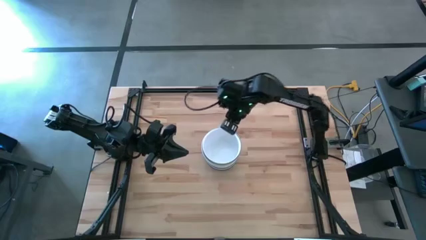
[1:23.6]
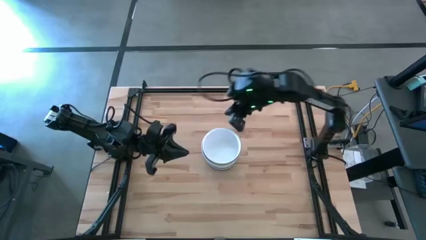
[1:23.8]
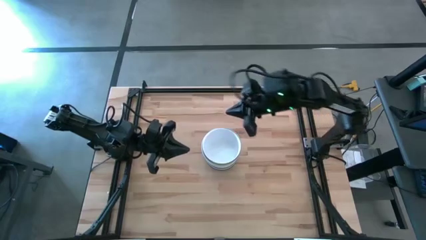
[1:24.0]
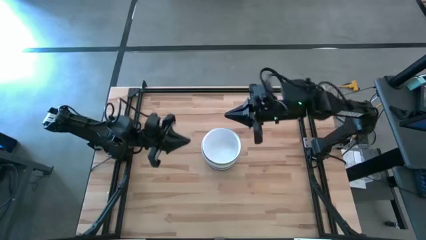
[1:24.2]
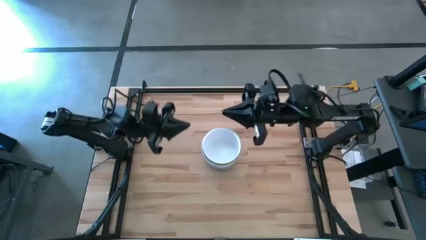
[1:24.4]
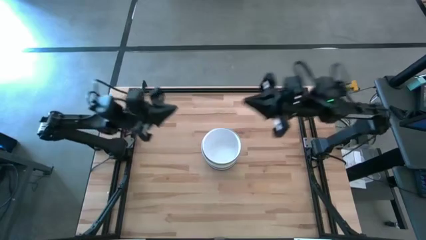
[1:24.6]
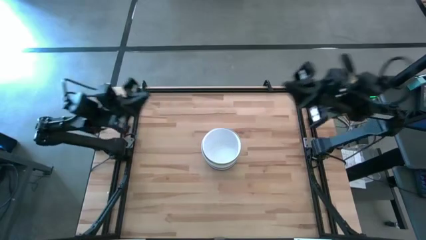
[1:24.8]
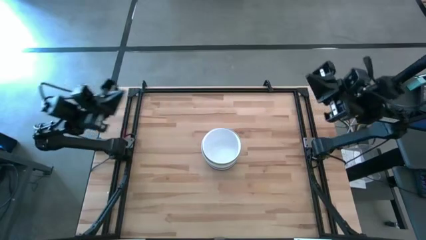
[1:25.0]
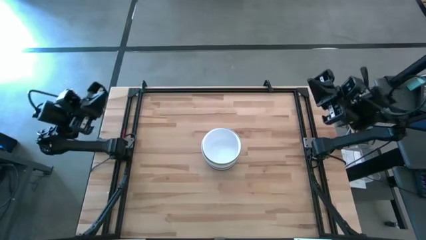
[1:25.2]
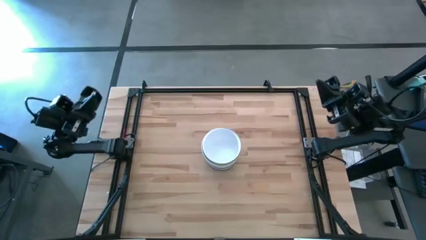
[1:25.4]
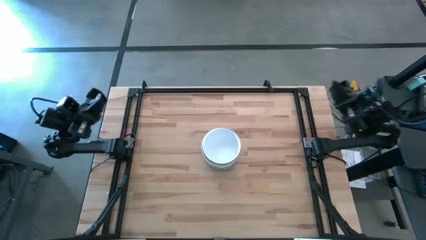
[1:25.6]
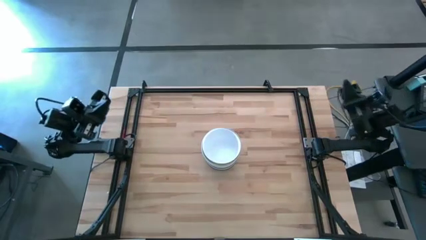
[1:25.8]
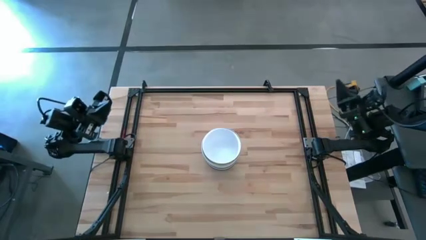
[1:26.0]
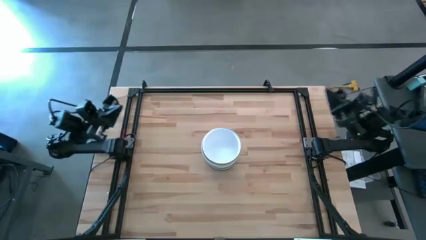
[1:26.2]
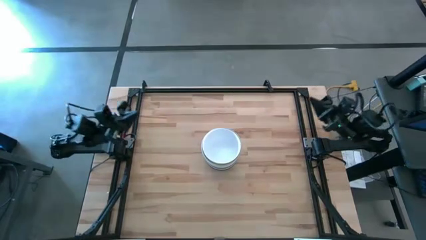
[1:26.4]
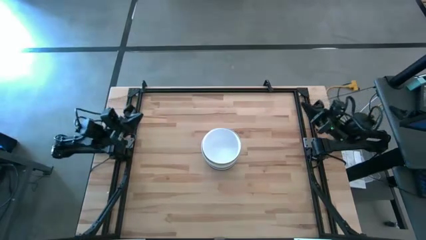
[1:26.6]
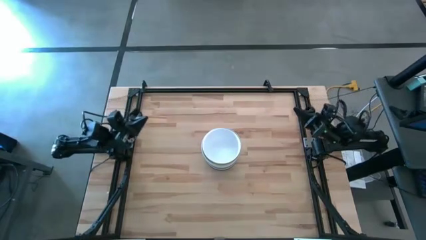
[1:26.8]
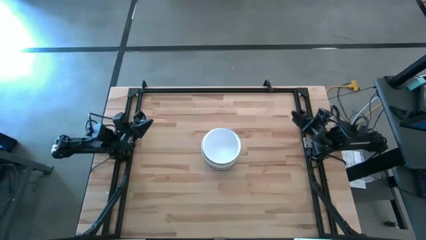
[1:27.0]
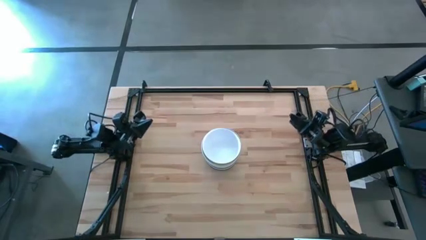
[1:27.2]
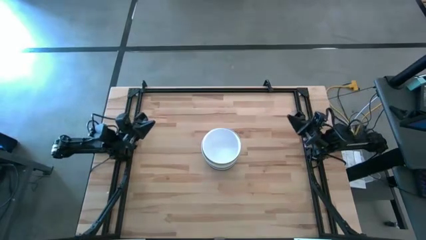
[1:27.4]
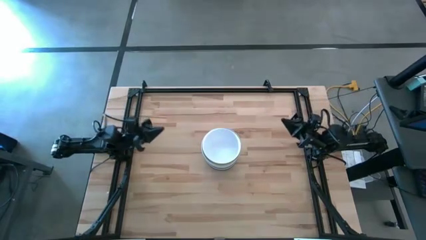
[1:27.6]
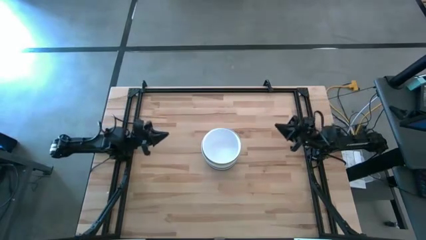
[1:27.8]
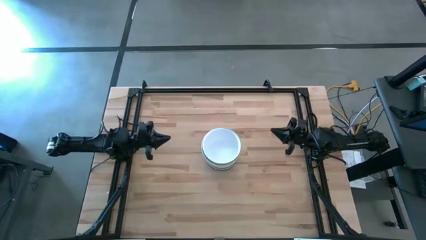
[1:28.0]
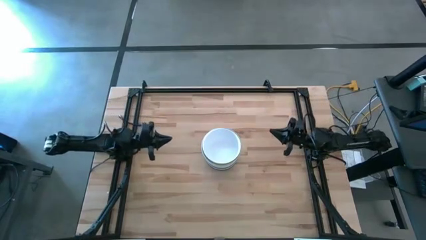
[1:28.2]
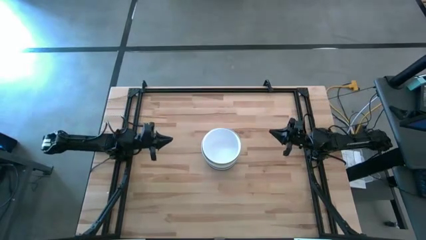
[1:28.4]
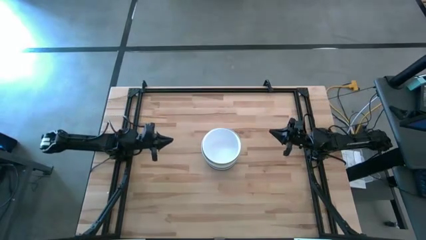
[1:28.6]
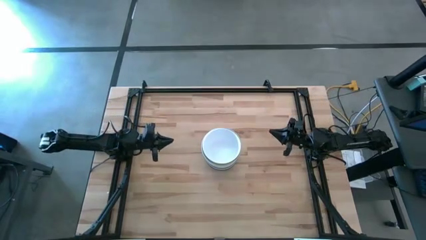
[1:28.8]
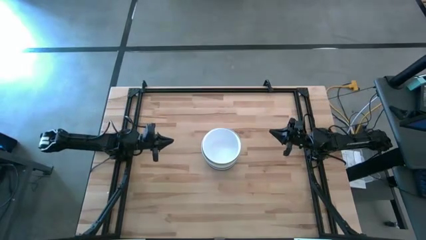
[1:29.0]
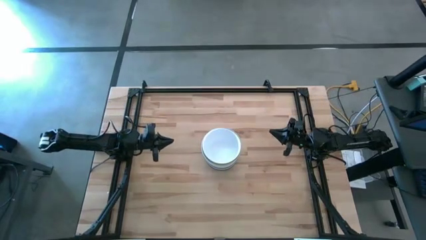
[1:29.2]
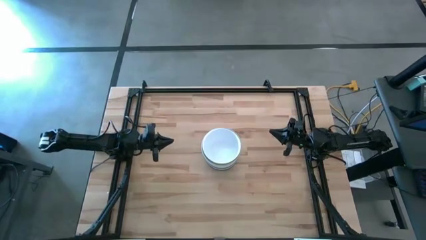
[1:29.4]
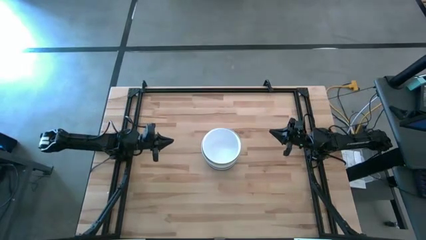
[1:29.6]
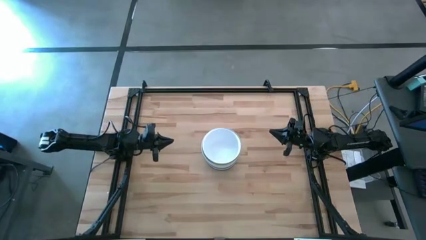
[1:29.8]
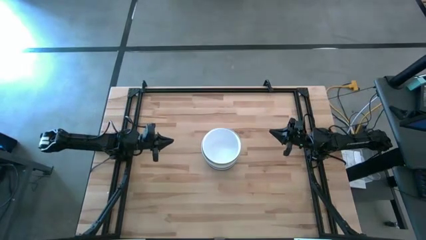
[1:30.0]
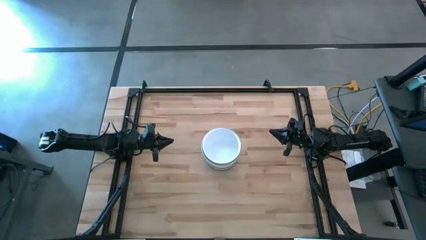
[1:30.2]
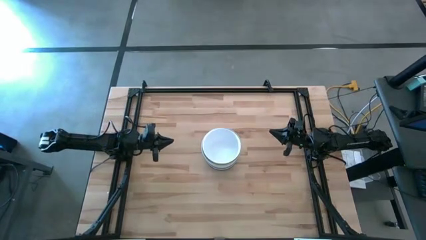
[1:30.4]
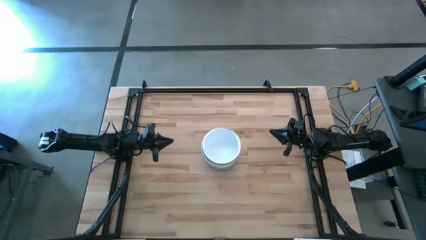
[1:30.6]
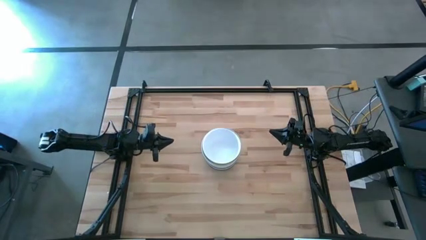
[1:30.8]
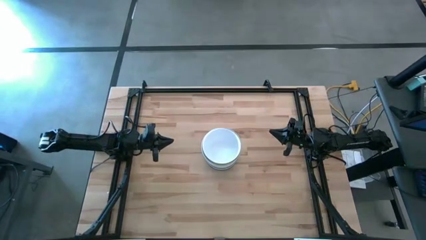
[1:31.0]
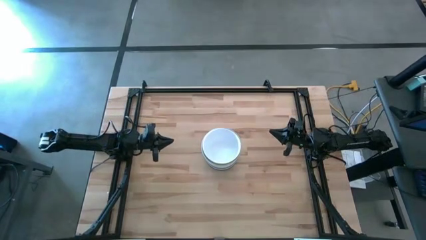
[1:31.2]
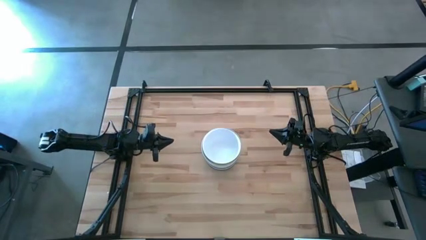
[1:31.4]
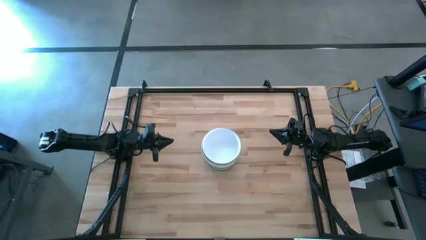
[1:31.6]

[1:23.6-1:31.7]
Task: Nest bowls inside each other
Return to Home Position

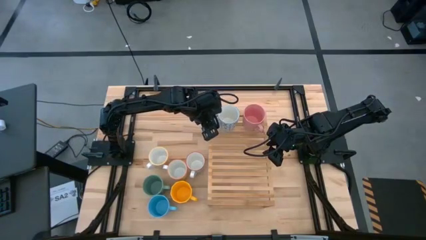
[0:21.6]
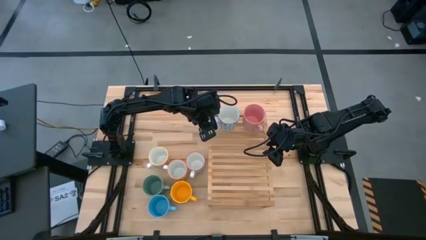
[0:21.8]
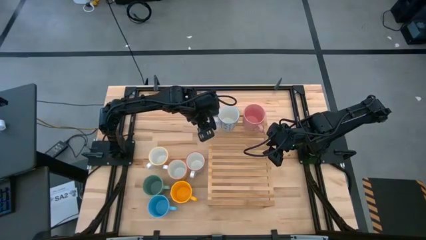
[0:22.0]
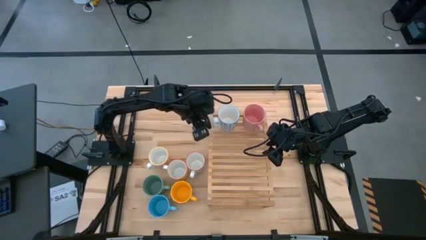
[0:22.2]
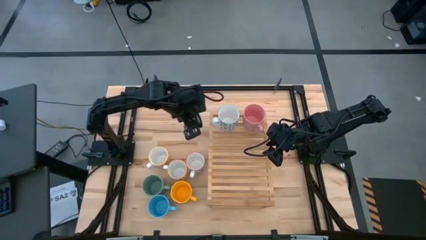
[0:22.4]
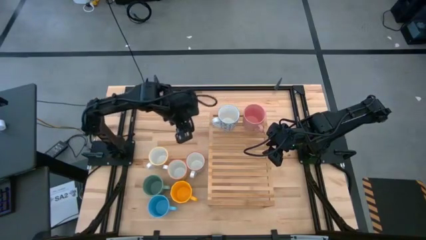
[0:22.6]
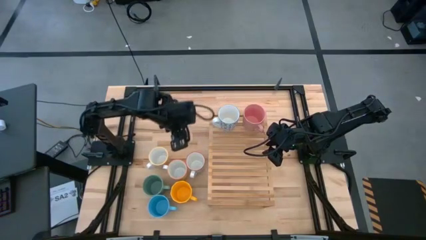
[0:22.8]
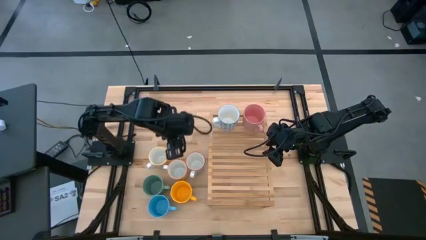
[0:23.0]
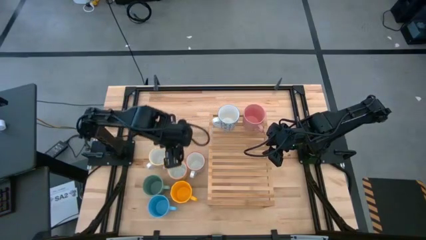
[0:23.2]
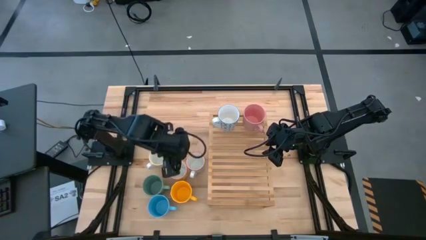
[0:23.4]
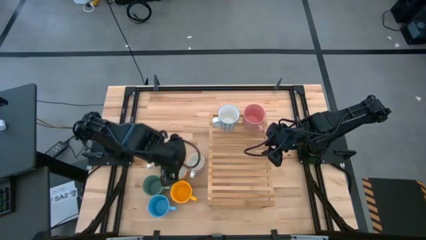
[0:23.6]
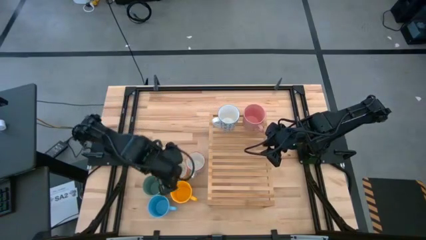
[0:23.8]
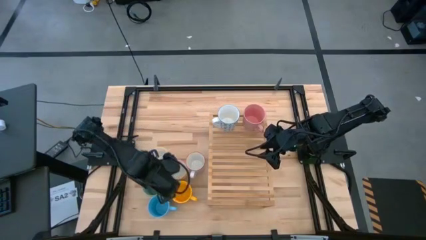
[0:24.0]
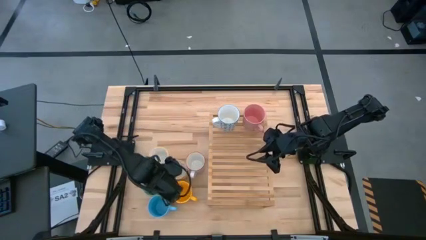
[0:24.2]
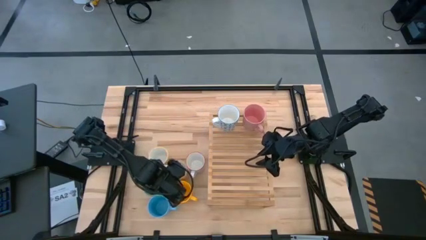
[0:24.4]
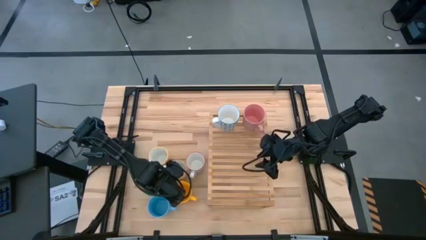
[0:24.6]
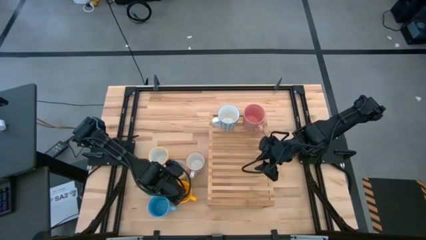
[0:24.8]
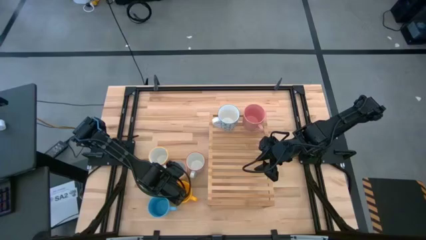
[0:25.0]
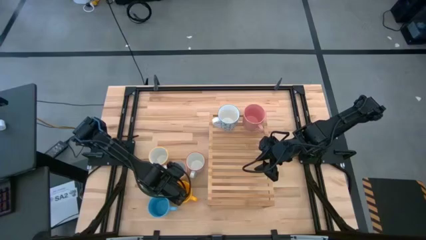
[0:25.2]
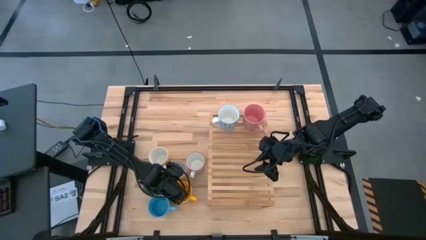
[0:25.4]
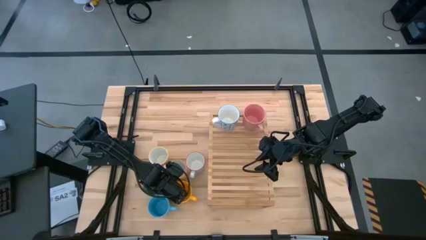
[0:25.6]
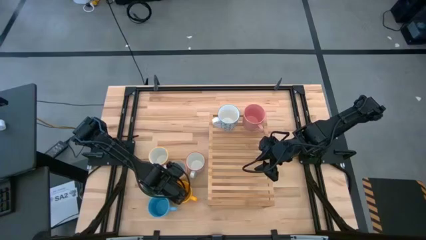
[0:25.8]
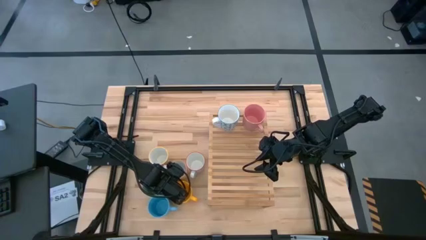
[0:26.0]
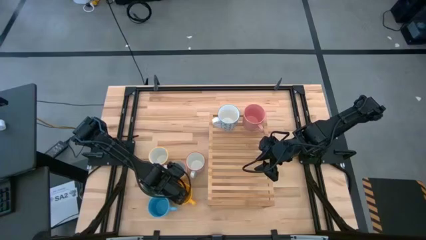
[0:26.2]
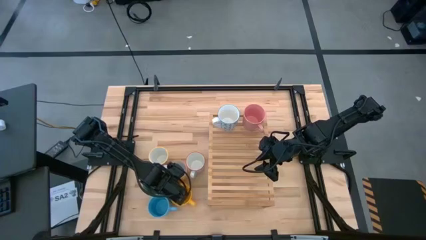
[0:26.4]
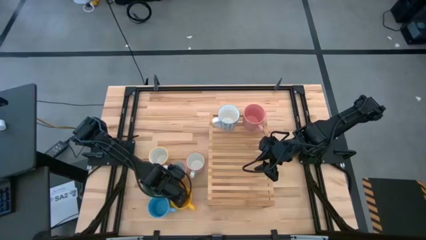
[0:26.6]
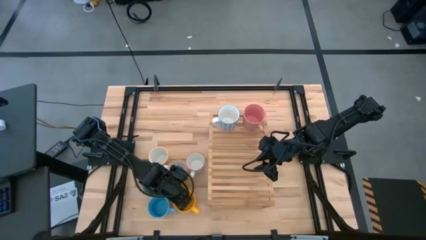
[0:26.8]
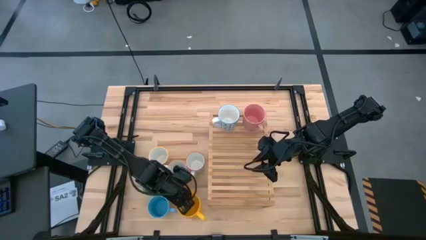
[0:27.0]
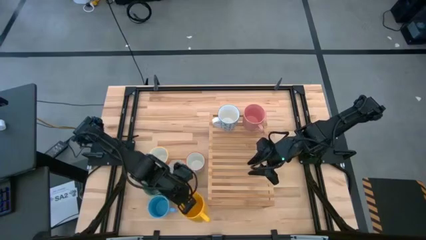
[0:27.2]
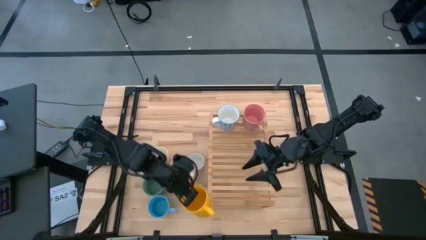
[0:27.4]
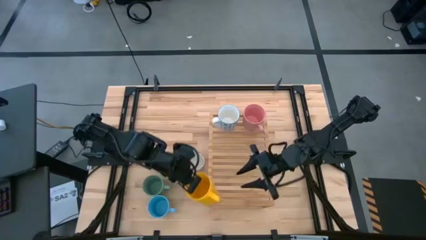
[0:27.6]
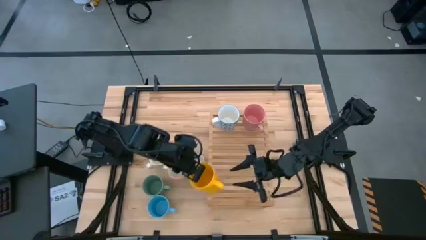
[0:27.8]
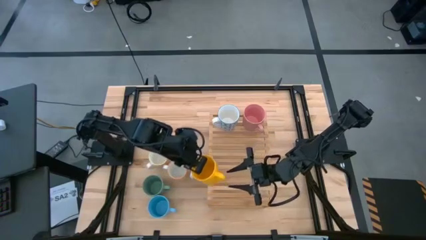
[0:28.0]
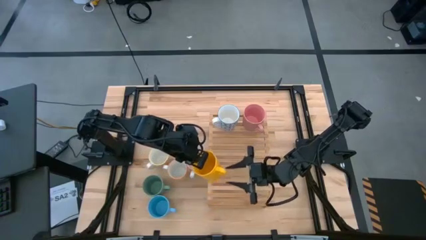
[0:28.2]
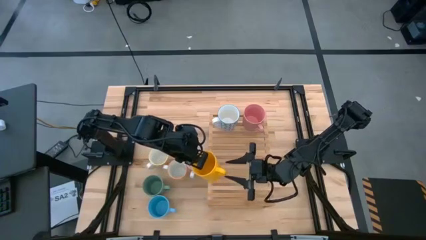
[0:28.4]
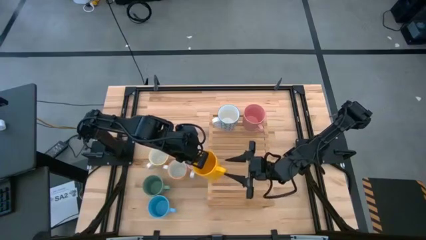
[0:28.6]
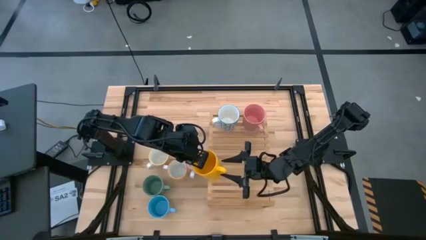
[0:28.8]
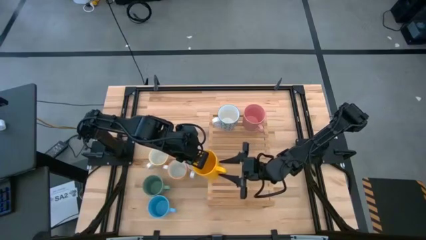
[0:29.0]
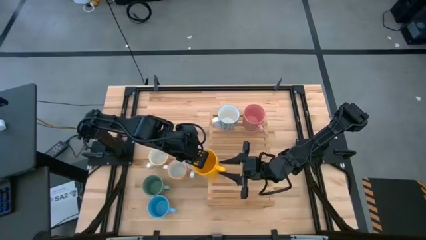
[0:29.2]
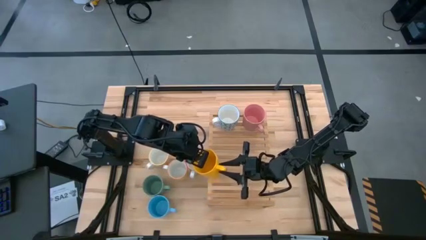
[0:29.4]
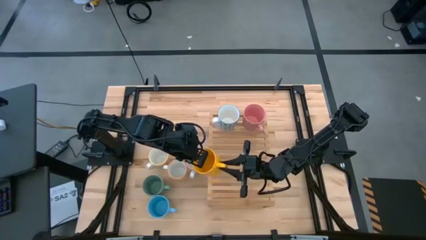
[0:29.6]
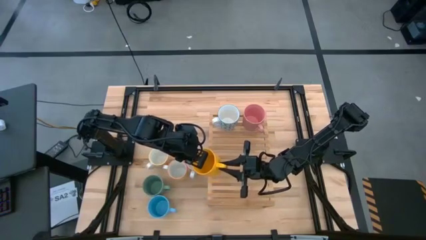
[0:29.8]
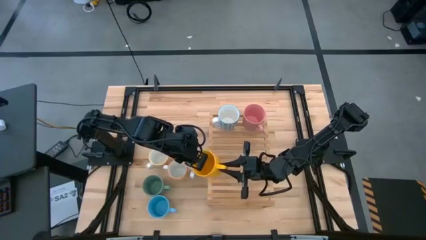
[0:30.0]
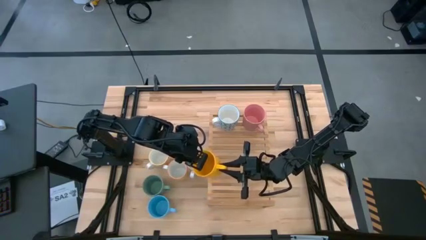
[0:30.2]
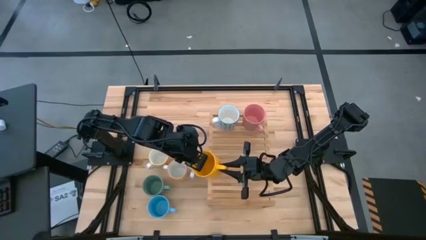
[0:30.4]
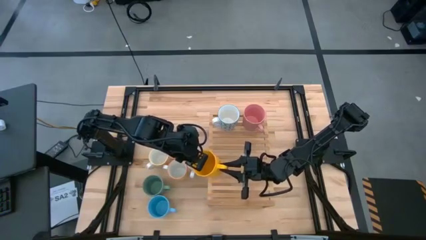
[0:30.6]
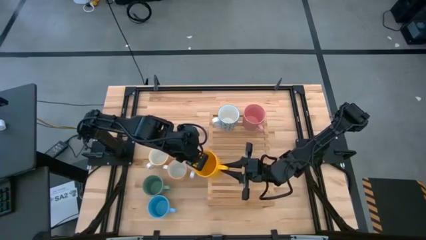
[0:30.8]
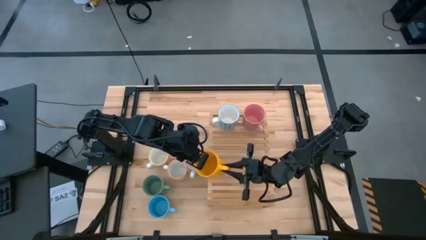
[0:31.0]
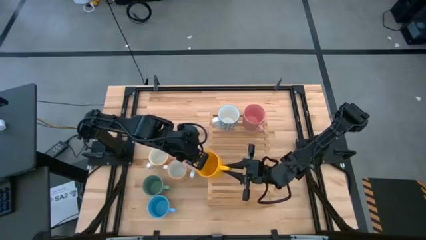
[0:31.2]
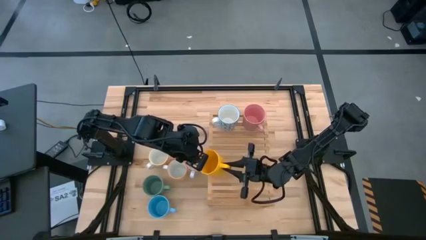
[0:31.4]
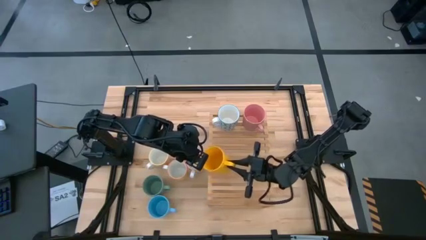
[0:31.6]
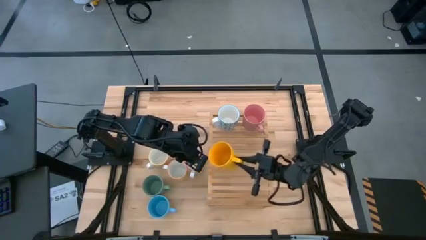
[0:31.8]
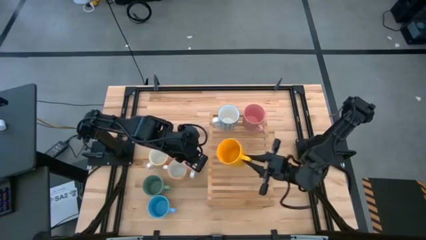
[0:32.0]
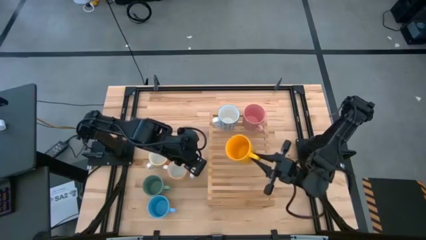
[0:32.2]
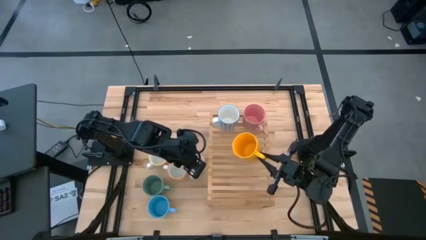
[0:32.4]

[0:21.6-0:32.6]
Task: Place coffee mugs
Put the yellow mug on the shelf
